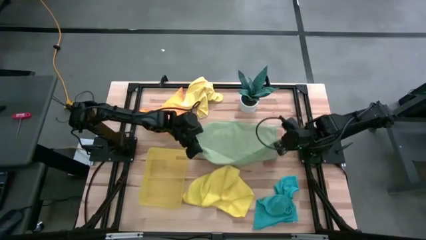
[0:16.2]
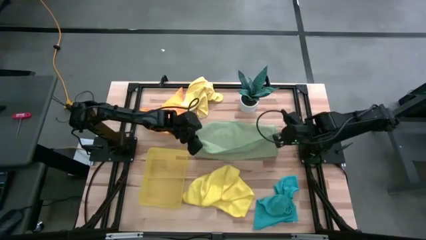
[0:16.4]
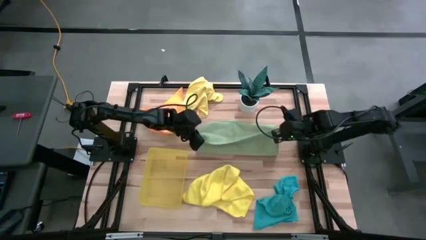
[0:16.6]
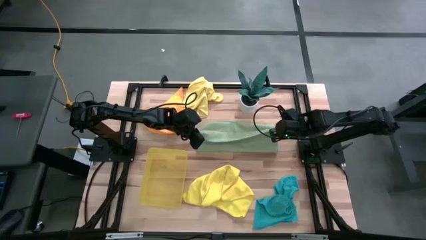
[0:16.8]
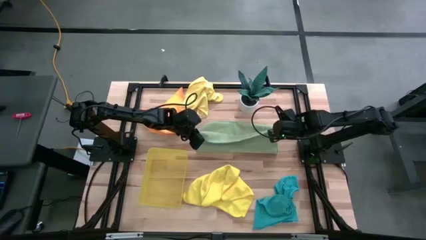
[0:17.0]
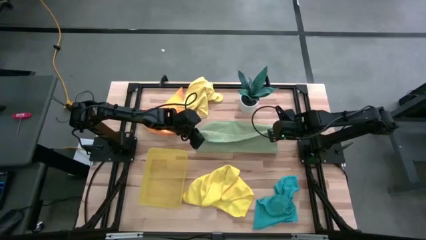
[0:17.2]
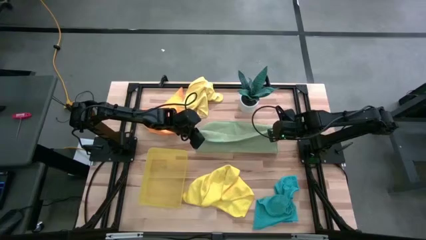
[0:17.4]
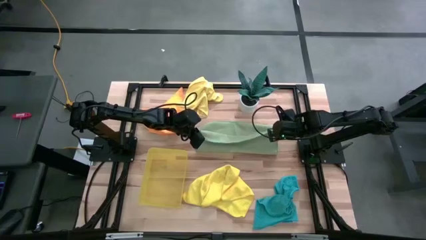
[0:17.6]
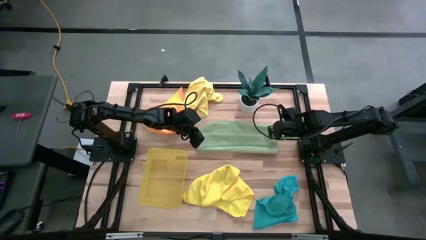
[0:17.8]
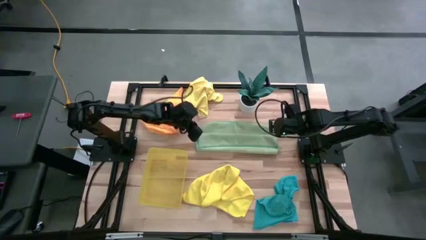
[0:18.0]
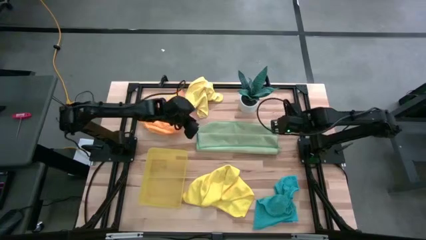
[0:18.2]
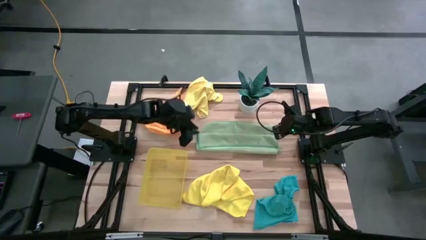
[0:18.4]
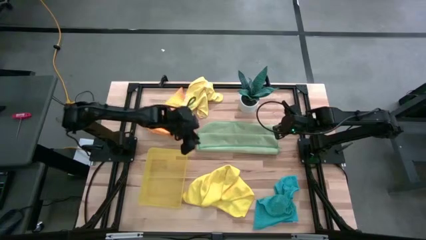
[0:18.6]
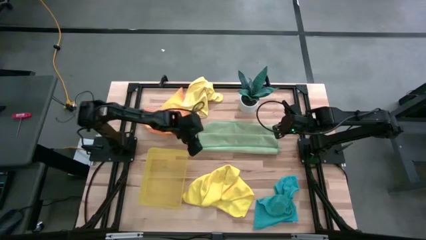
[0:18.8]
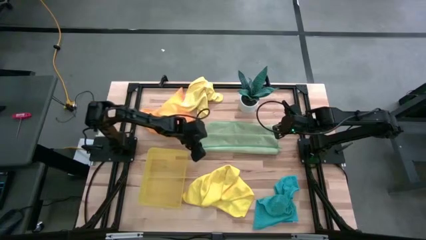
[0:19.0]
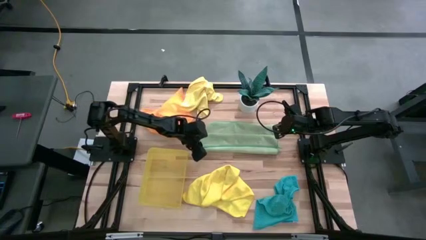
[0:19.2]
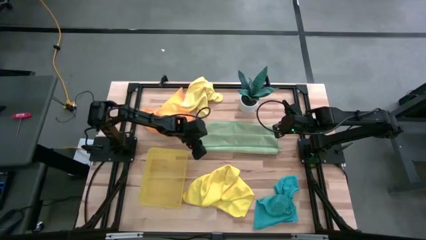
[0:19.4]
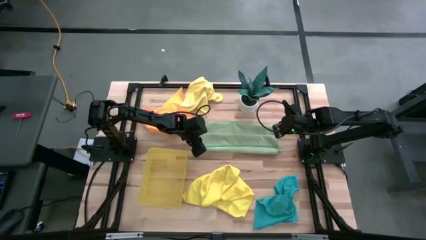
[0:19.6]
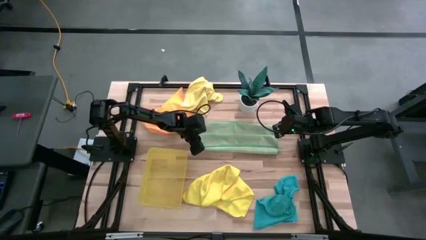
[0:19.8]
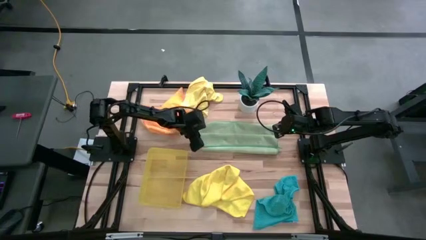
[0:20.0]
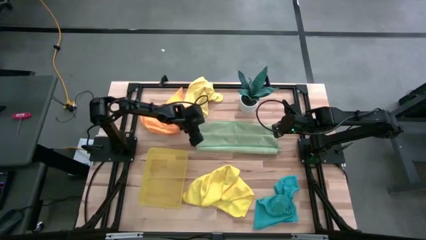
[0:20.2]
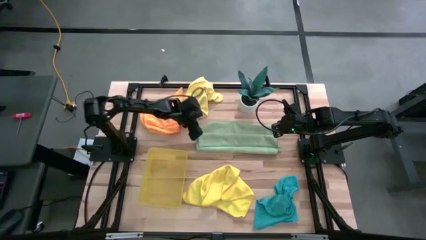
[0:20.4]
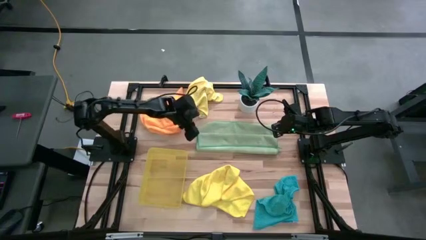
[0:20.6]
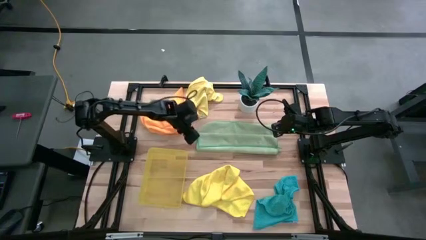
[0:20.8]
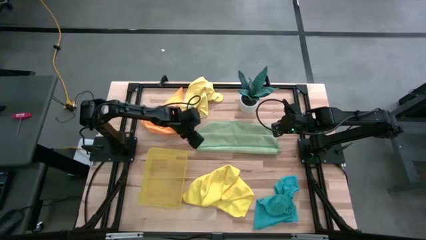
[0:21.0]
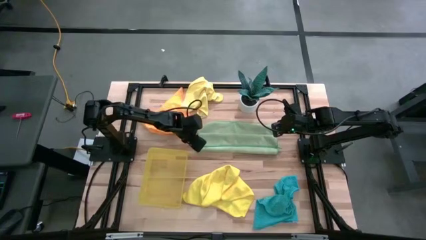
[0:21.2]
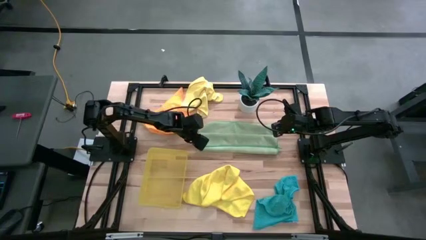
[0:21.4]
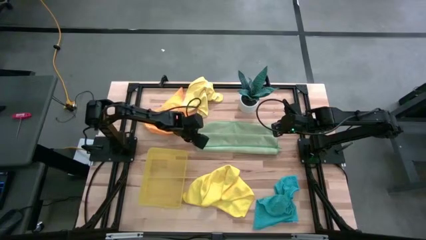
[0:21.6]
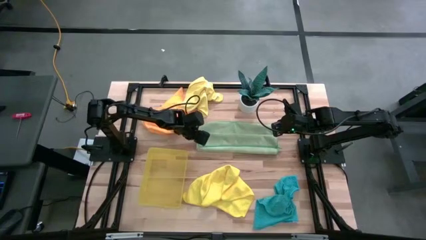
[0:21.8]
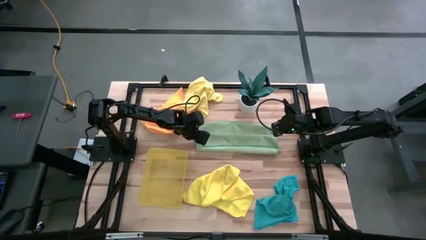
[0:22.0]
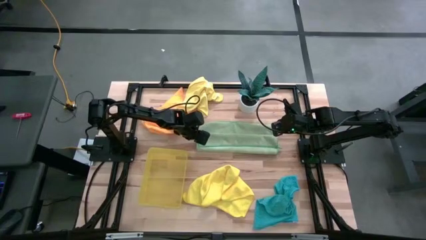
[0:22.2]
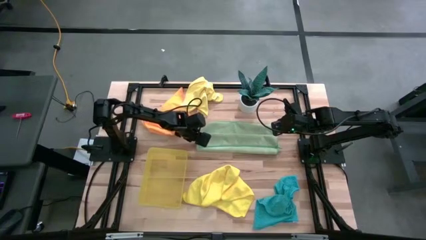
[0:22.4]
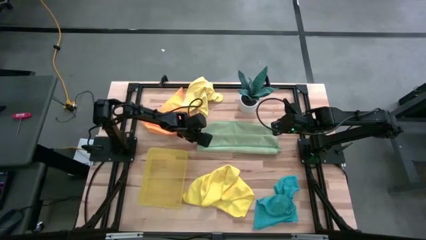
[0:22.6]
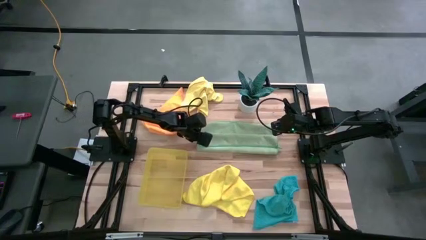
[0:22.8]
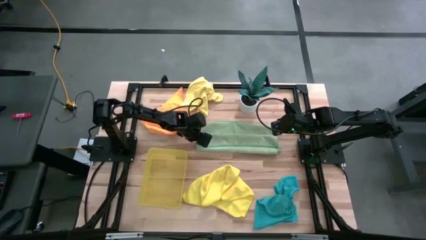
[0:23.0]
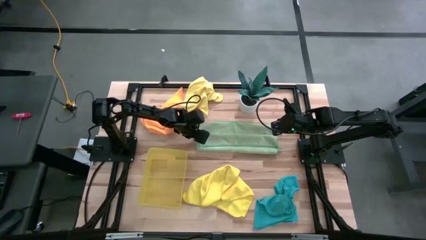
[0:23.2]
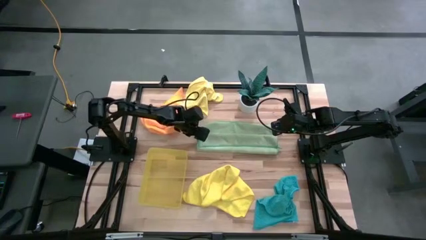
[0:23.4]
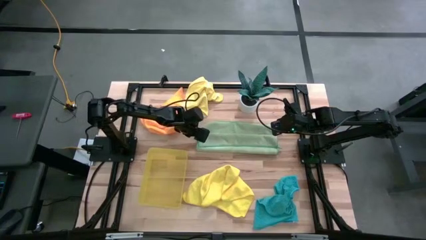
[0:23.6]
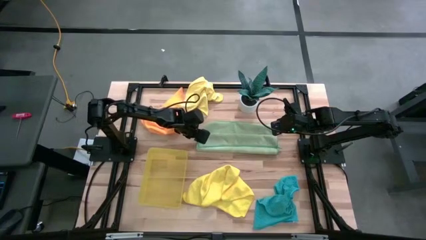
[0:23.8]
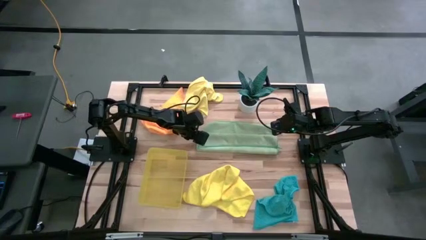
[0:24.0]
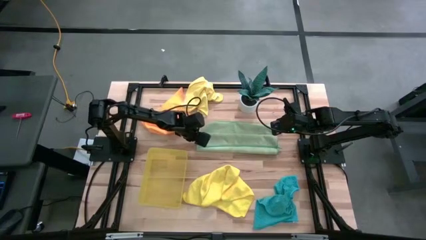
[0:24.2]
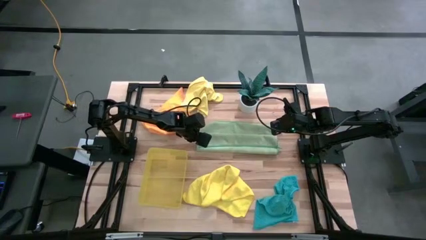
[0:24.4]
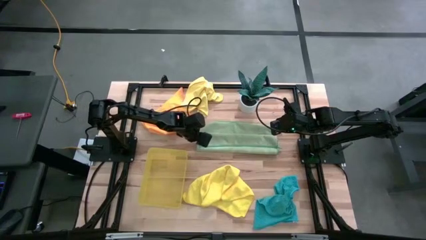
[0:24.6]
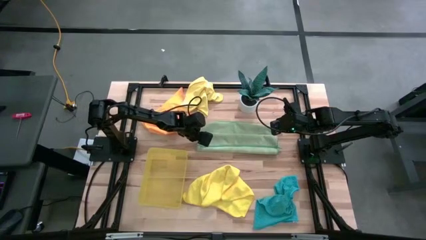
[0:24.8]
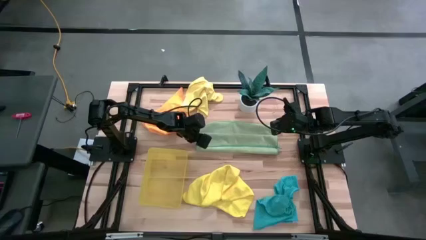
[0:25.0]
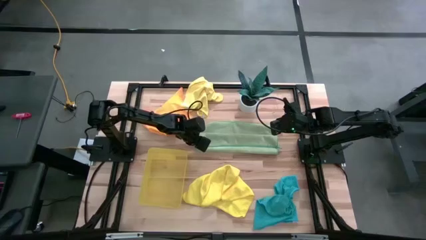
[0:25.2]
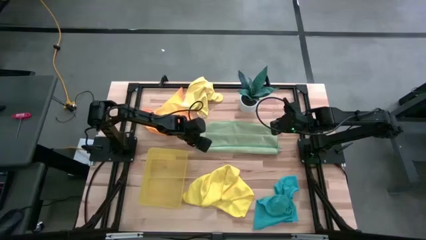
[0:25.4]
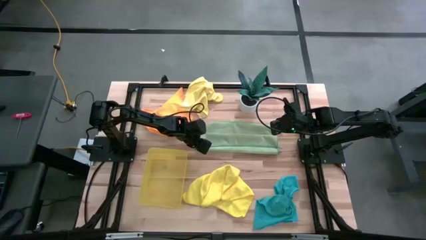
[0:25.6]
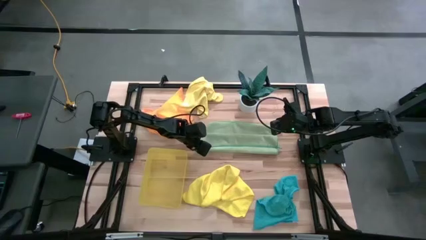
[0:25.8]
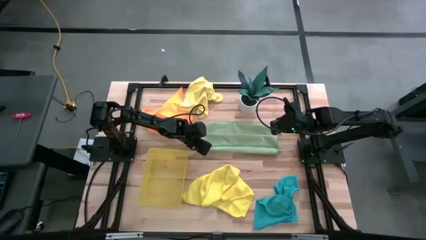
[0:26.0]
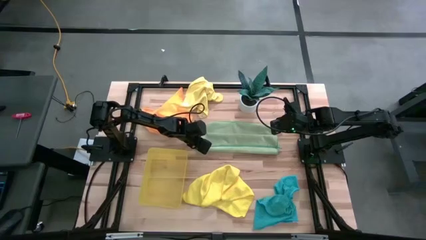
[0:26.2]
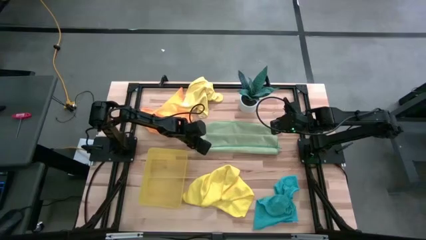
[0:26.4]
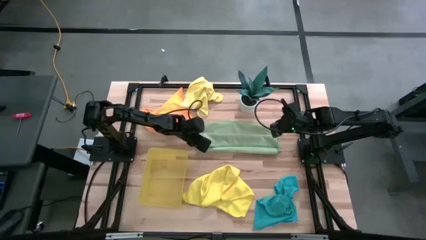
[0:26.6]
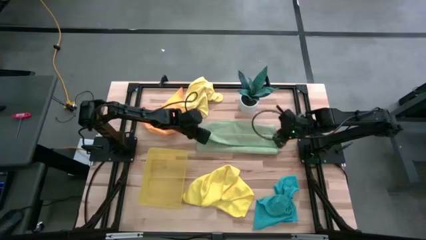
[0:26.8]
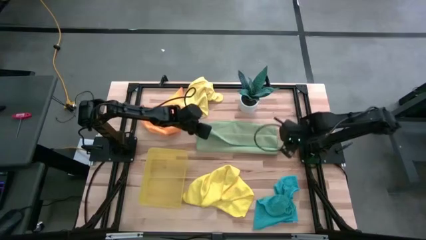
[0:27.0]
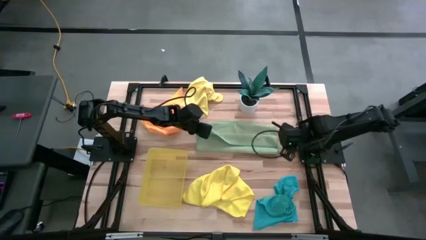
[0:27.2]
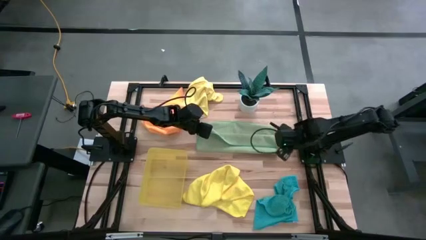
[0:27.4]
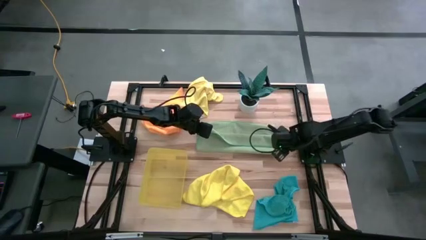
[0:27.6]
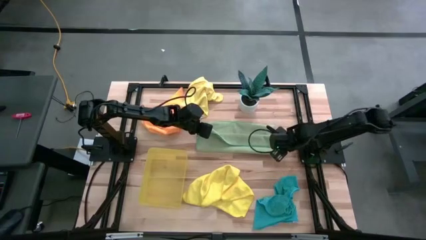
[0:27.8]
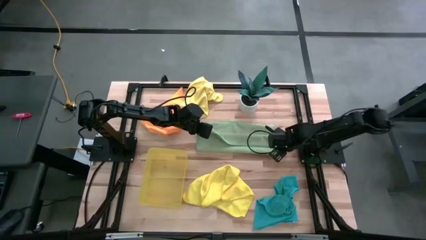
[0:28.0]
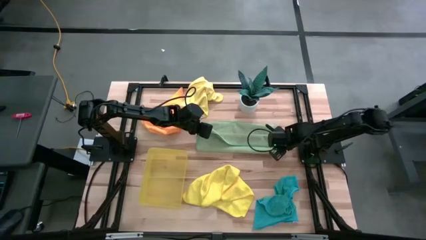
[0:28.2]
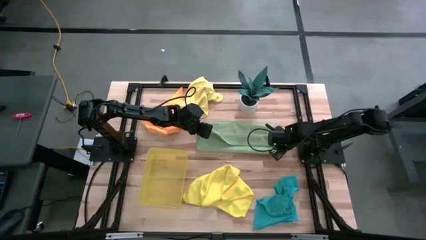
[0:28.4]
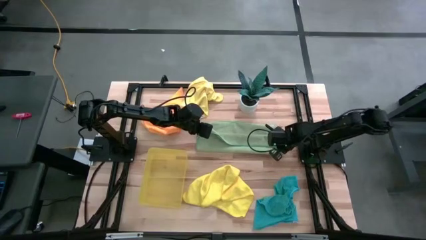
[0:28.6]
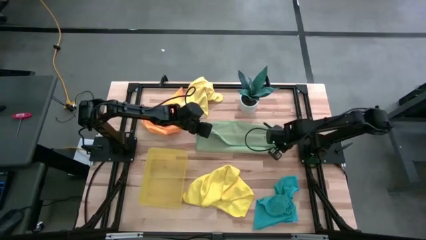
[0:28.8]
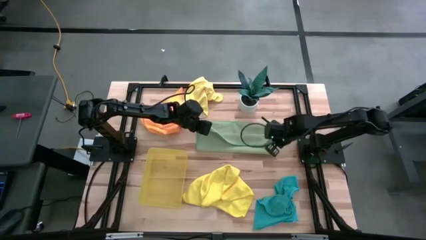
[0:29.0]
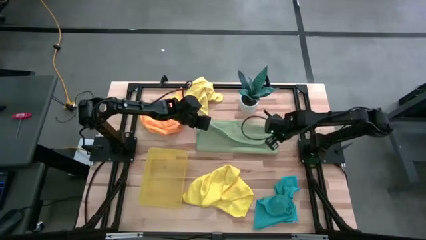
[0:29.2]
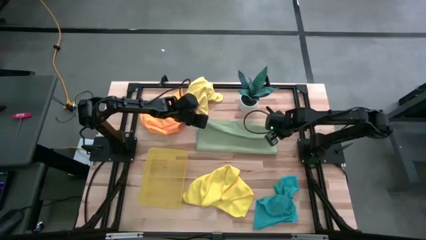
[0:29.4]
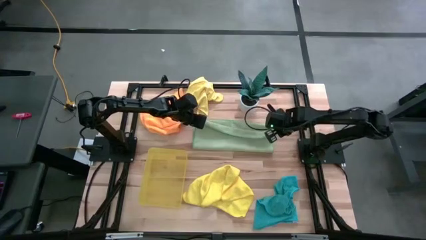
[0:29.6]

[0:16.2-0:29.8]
Task: Fold microfiber towels
Fold the green microfiber cloth
